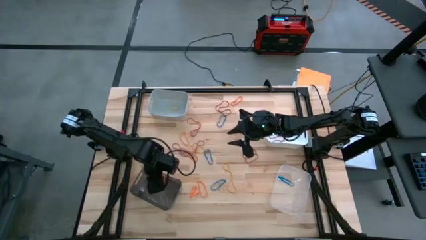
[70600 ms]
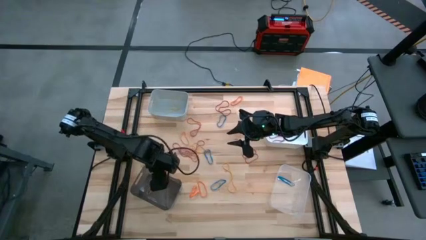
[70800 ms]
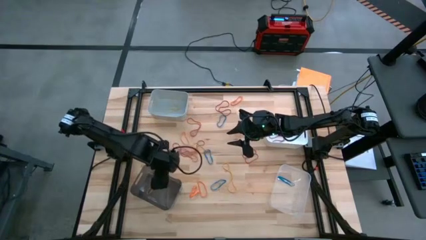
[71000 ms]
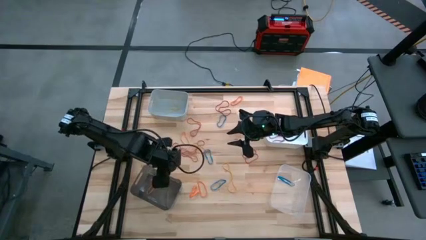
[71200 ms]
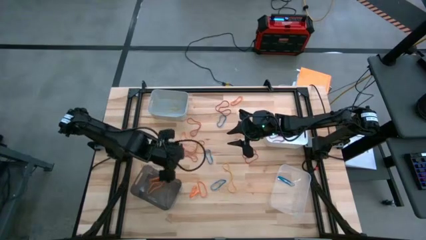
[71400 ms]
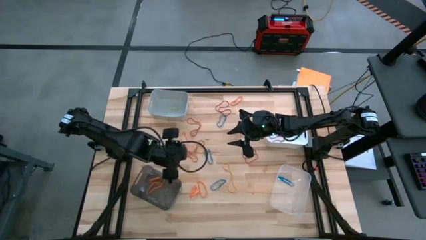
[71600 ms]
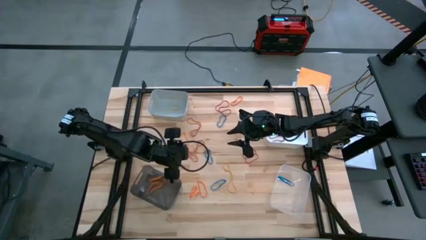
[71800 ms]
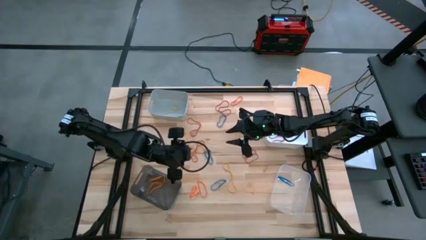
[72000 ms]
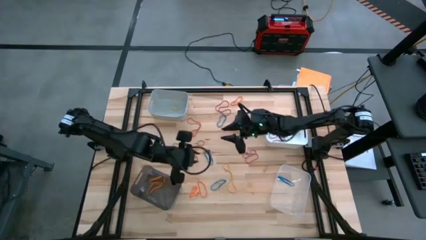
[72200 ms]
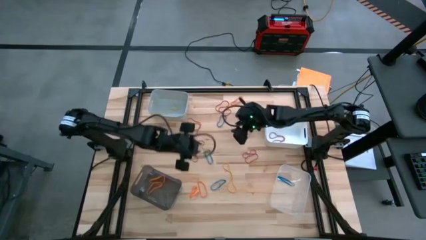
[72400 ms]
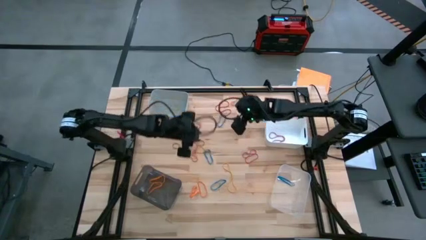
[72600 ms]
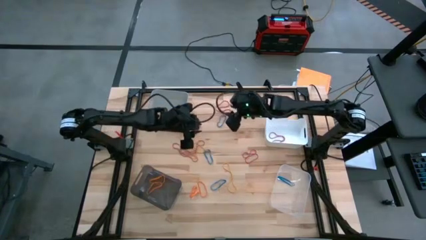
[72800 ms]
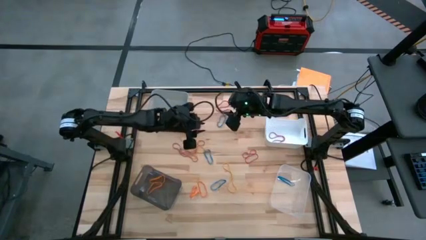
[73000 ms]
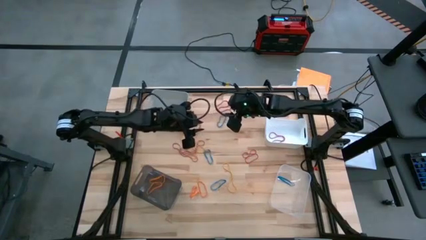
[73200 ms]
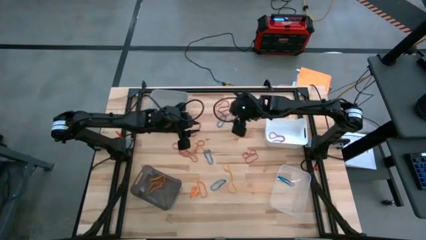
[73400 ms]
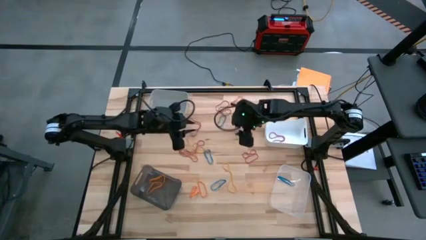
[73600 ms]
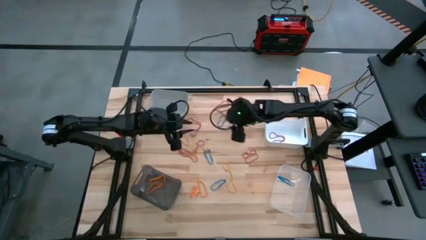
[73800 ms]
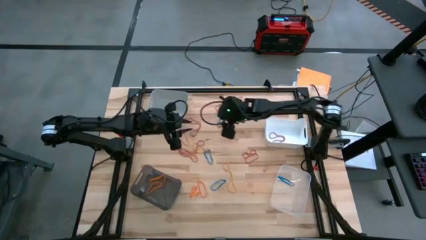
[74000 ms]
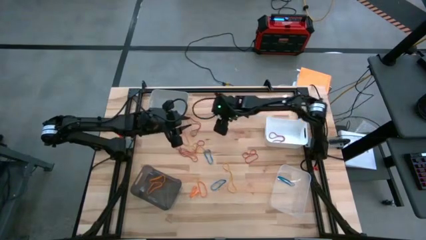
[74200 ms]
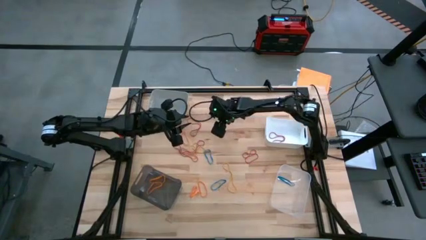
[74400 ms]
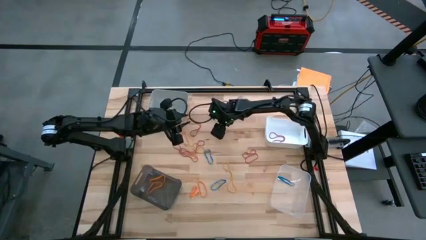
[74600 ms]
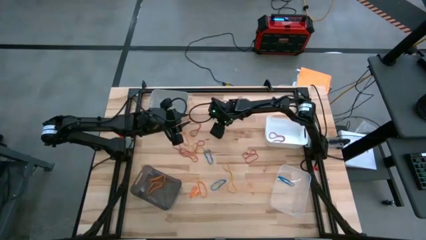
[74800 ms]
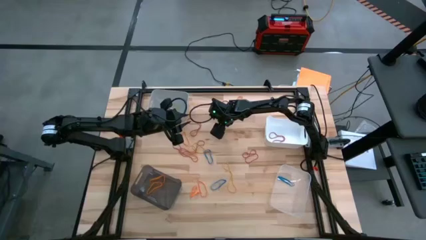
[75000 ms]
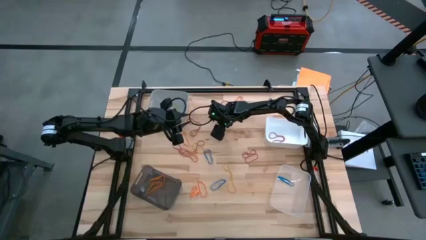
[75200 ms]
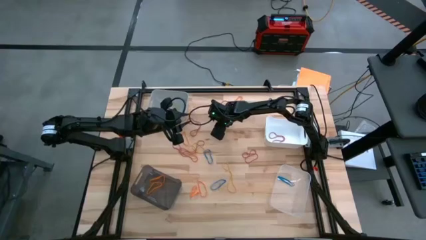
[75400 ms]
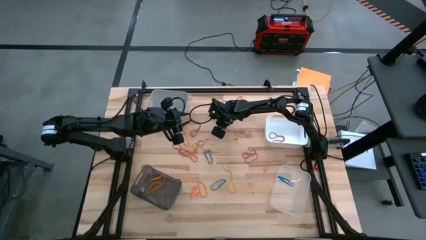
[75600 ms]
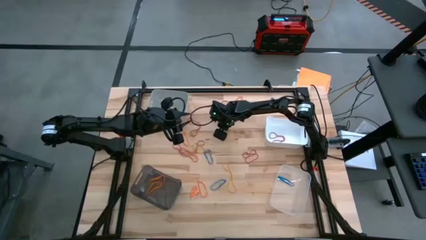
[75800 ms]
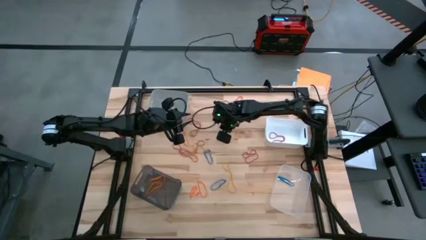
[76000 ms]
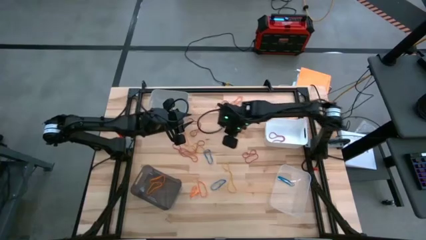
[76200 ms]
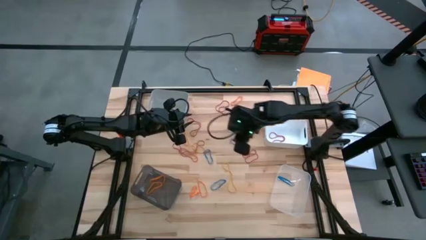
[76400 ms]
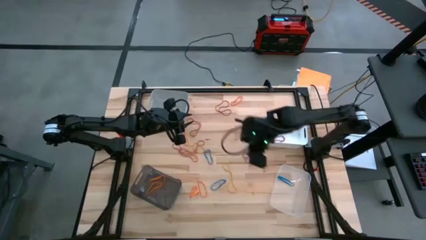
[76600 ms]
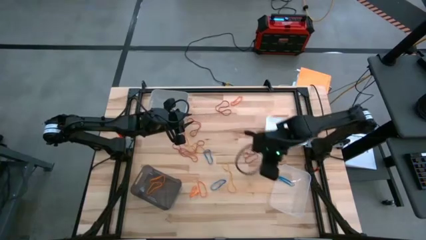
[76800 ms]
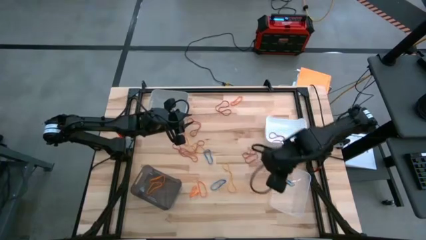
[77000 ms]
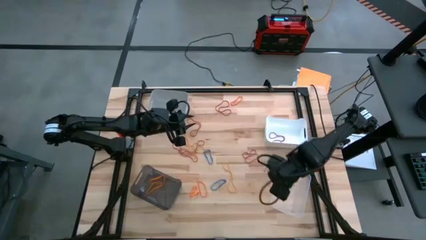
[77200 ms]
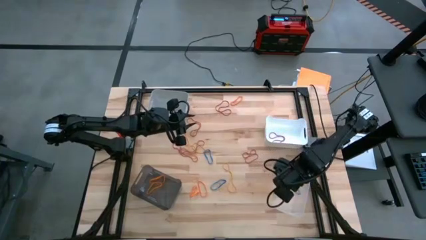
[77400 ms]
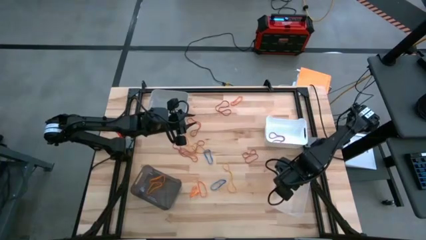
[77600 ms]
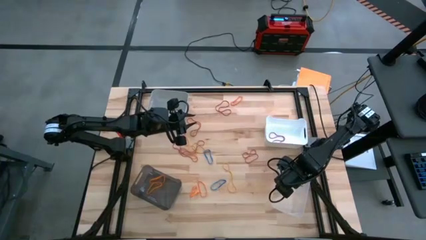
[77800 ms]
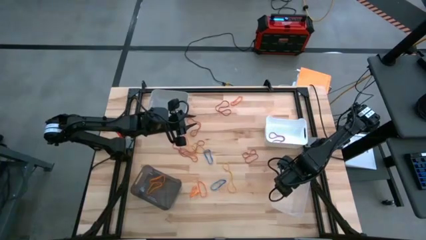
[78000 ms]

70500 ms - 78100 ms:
Task: Sort rubber bands into baskets
Put the blue rubber band into the transparent bin

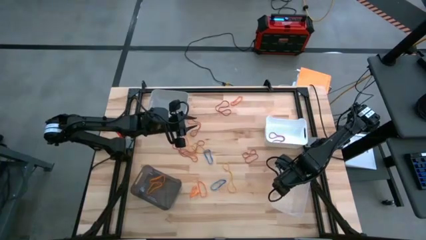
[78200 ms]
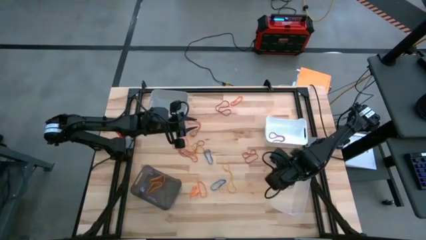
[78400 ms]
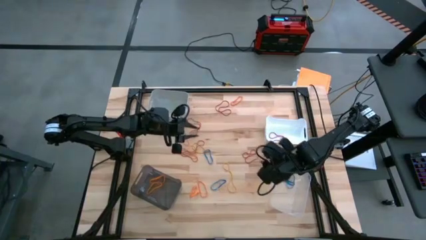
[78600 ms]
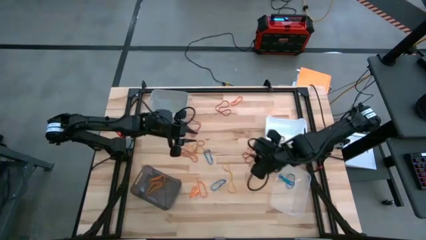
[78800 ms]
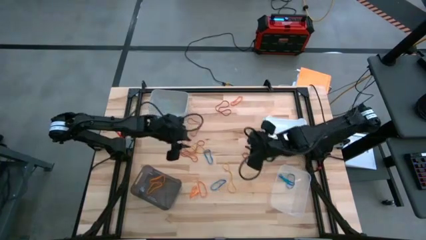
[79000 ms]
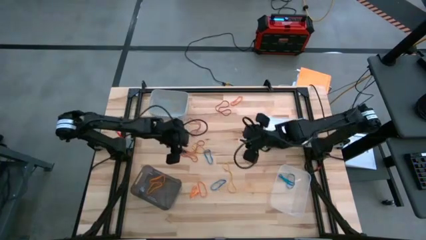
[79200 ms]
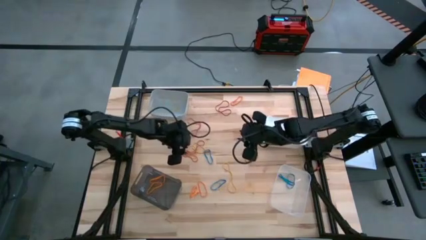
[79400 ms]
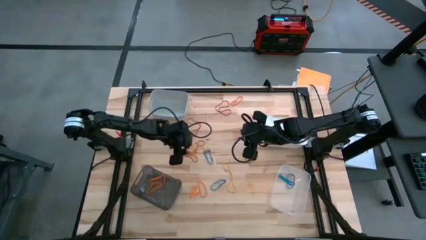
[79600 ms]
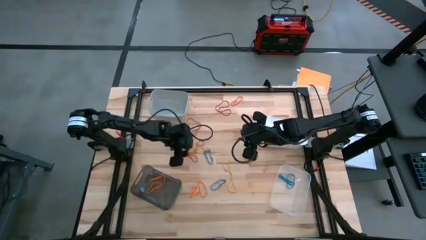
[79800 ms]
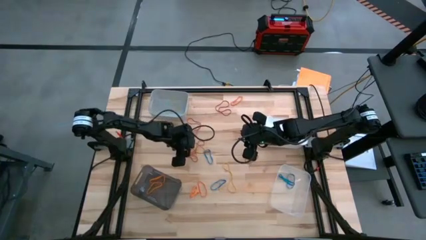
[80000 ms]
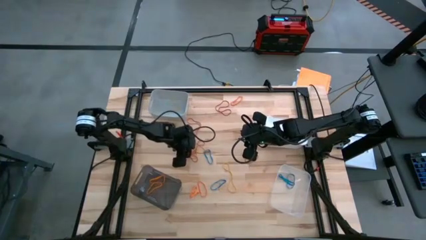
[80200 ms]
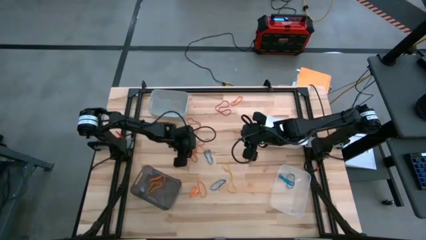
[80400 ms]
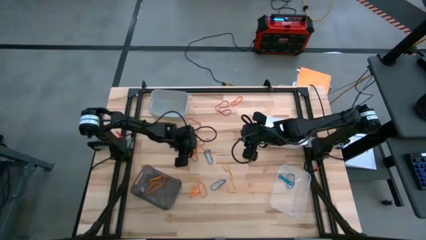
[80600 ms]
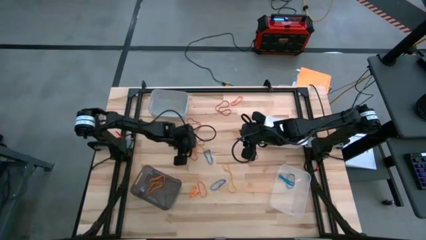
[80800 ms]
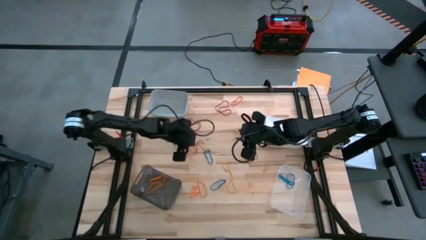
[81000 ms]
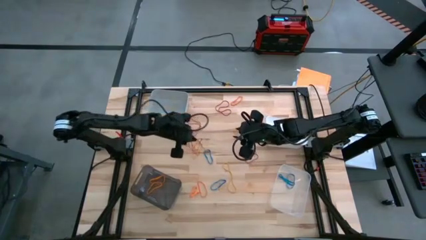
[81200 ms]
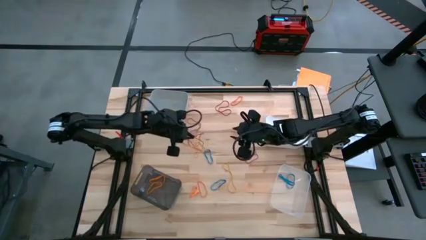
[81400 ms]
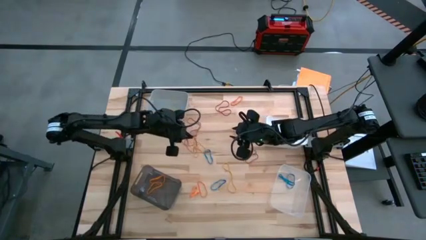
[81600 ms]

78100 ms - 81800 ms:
Put the red rubber band into the white bin

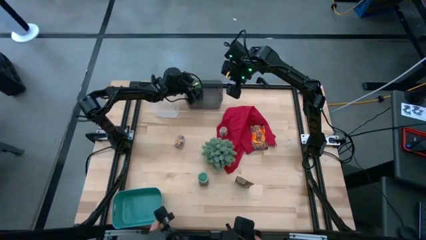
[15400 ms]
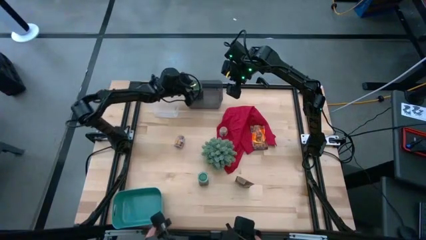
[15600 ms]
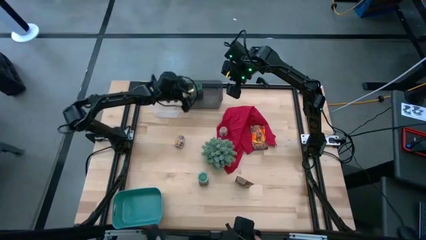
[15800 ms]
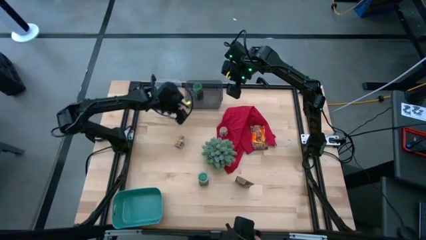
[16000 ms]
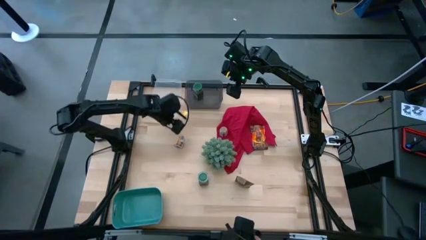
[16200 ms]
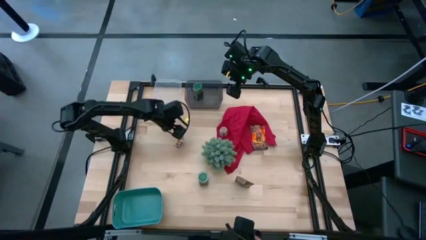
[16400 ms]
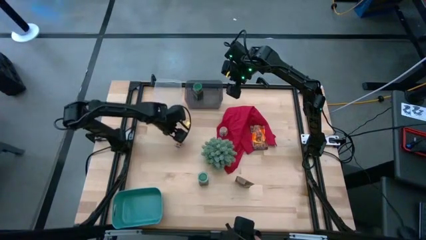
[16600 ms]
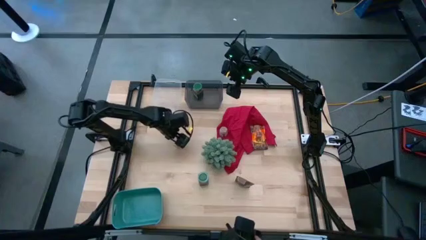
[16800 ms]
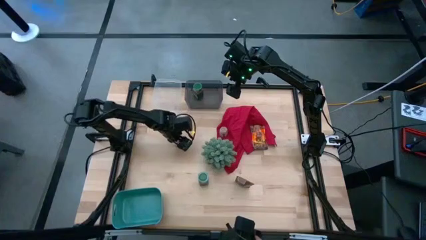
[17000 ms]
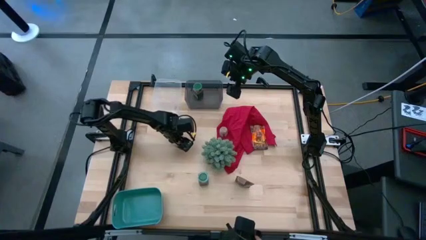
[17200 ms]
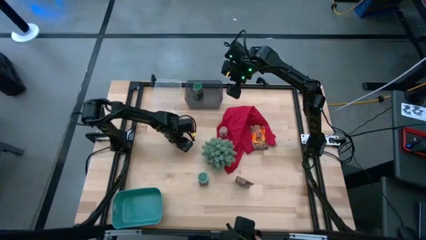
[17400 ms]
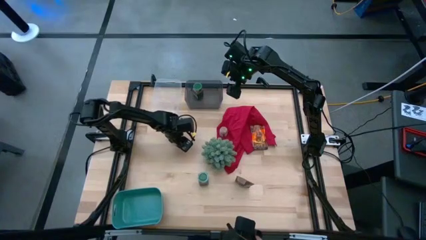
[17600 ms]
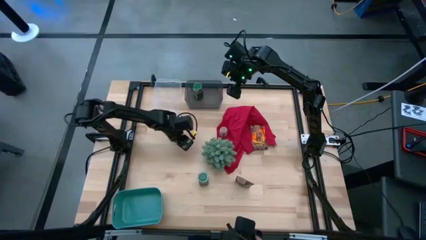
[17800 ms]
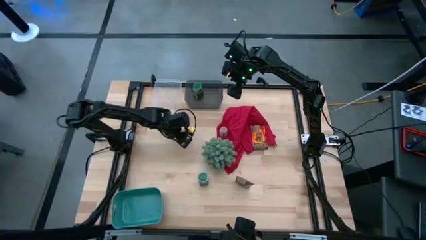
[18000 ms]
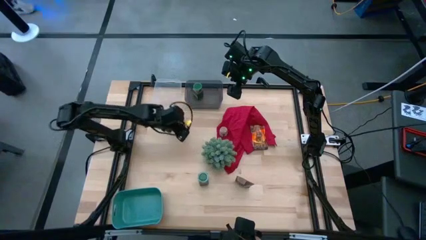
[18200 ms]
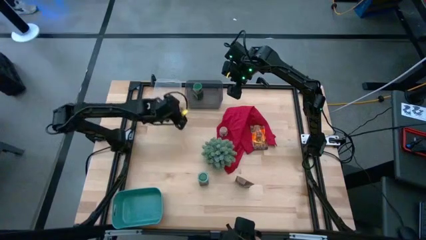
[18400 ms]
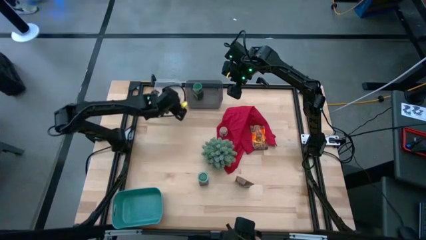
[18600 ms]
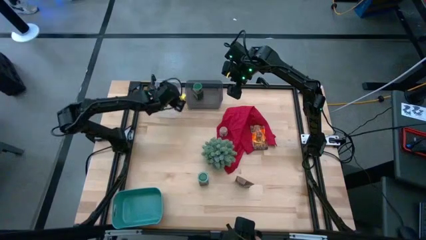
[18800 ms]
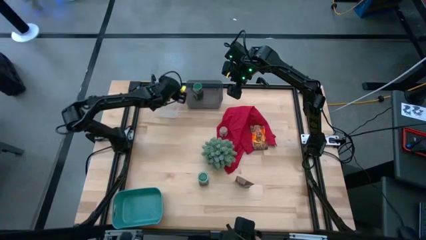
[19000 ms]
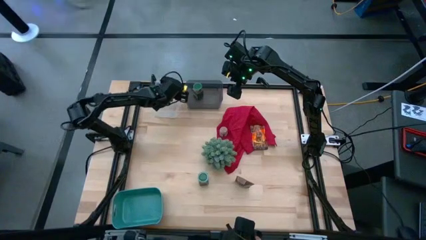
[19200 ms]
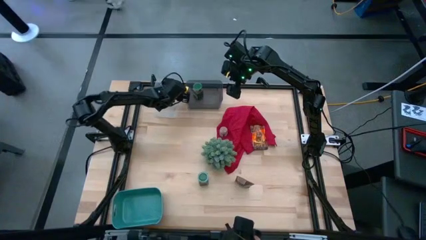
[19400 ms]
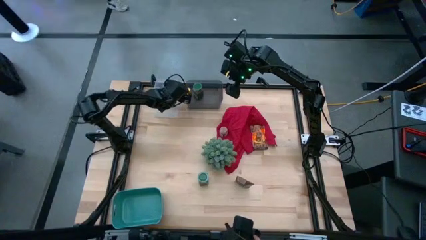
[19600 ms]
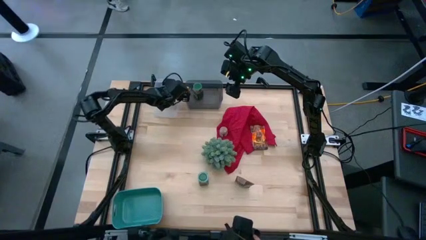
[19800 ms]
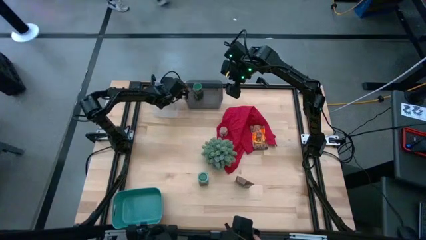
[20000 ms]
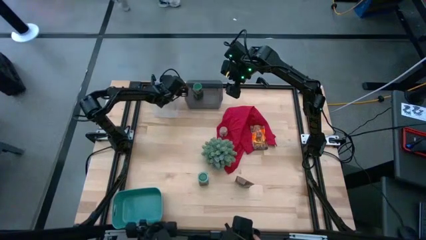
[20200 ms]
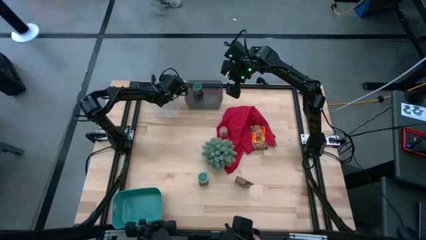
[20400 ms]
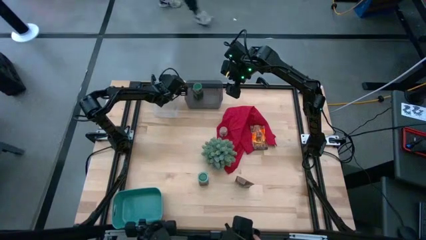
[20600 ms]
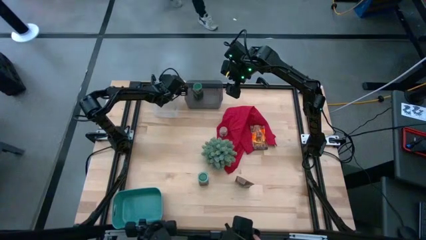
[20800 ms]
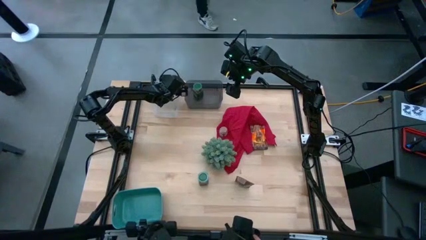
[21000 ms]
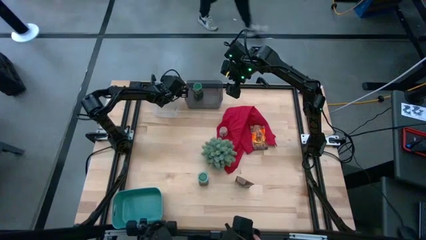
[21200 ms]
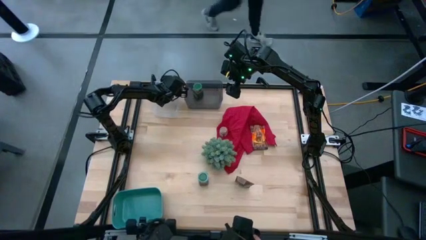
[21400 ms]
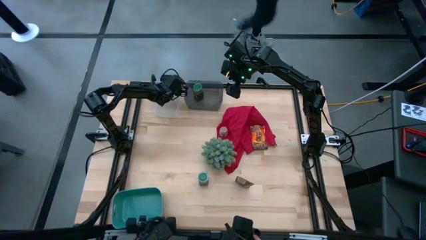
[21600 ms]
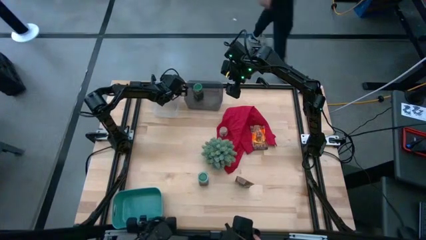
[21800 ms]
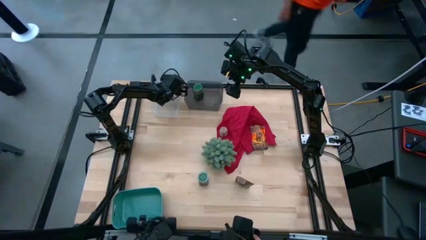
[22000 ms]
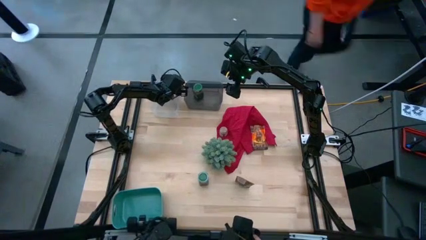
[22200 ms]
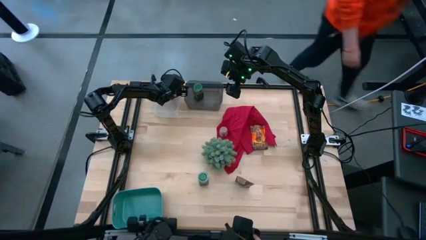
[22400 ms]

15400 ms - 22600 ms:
Task: Sort spices by type
Put the left brown spice bottle into the transparent bin
